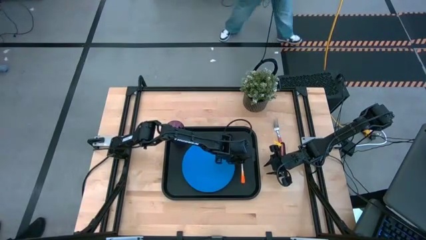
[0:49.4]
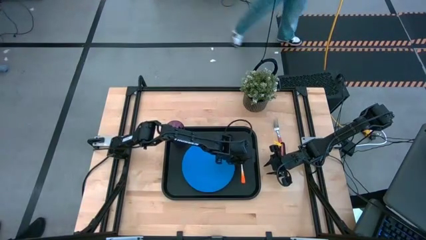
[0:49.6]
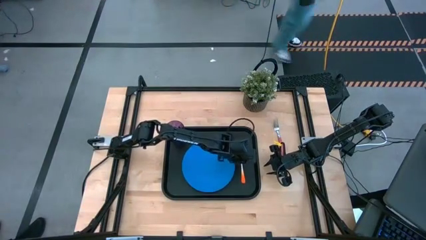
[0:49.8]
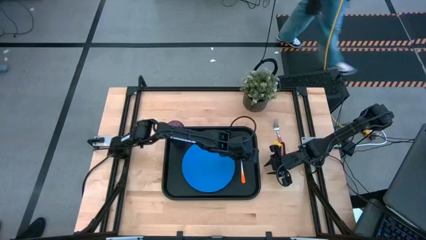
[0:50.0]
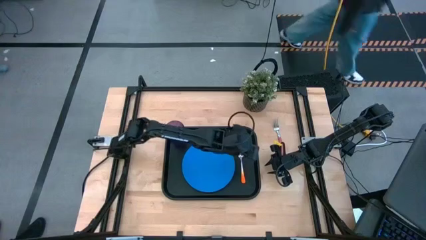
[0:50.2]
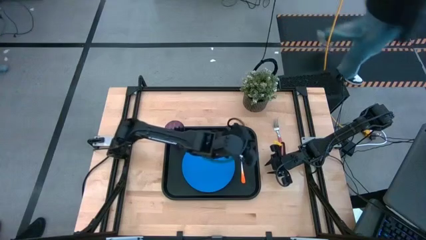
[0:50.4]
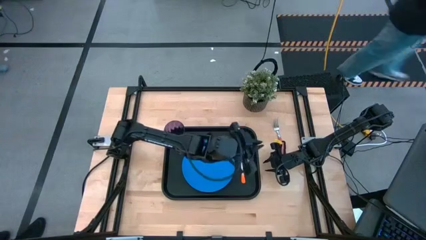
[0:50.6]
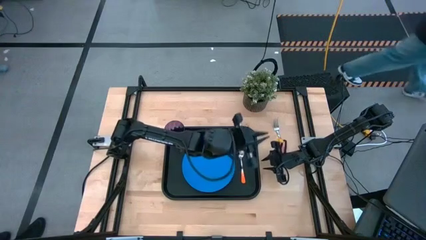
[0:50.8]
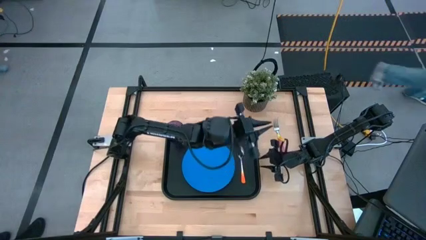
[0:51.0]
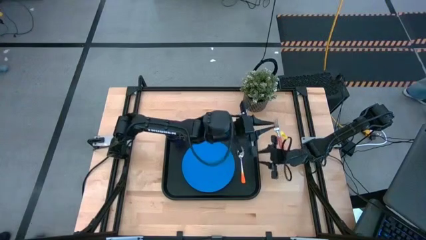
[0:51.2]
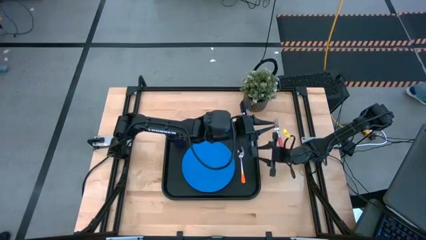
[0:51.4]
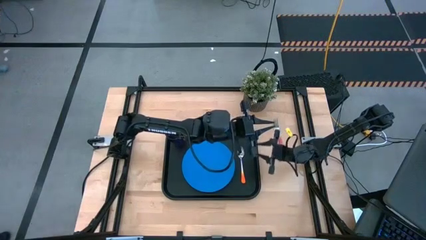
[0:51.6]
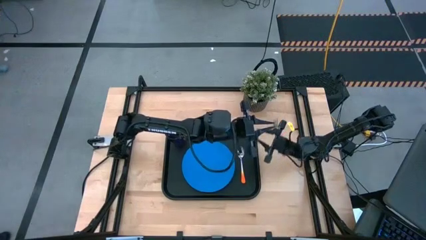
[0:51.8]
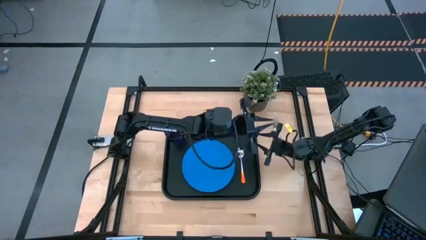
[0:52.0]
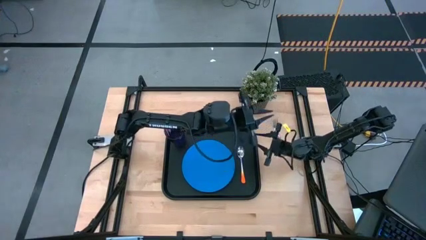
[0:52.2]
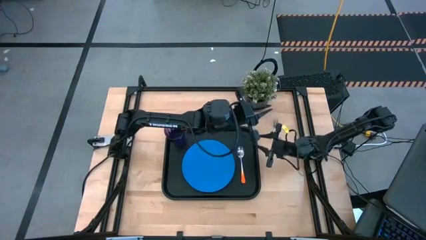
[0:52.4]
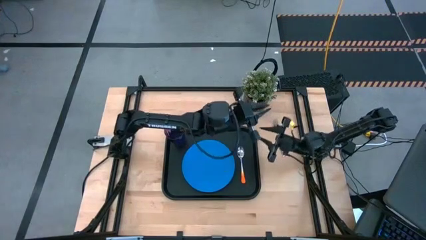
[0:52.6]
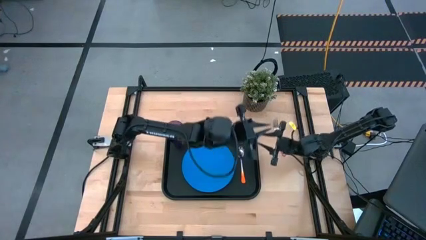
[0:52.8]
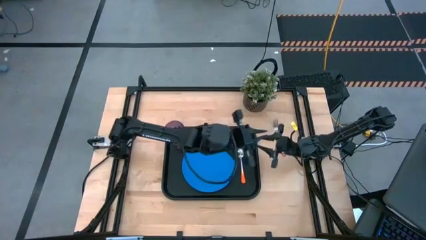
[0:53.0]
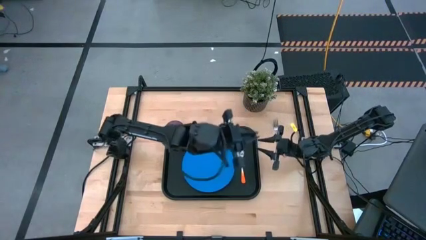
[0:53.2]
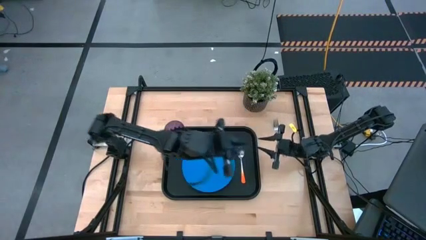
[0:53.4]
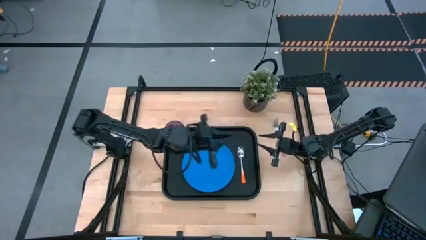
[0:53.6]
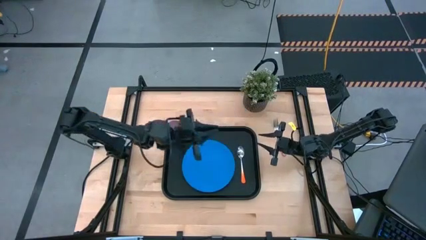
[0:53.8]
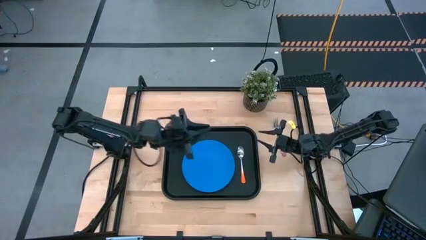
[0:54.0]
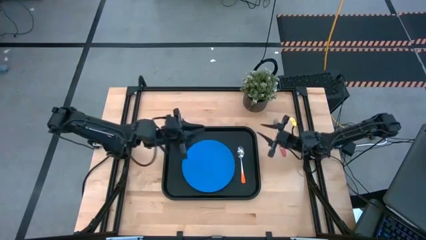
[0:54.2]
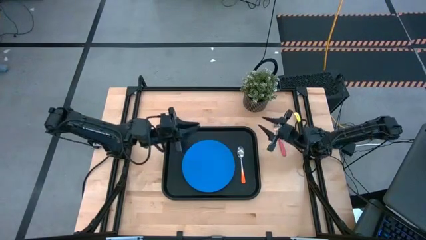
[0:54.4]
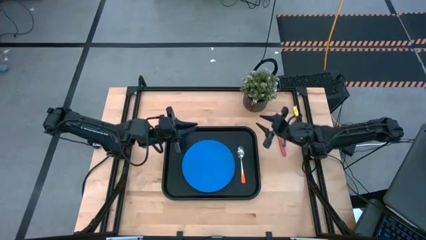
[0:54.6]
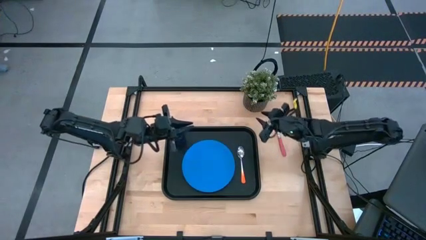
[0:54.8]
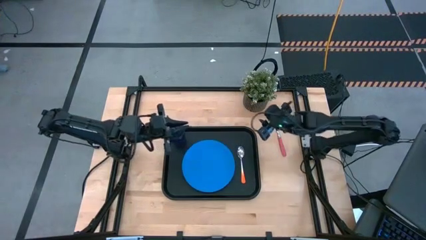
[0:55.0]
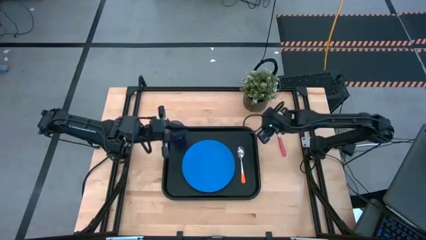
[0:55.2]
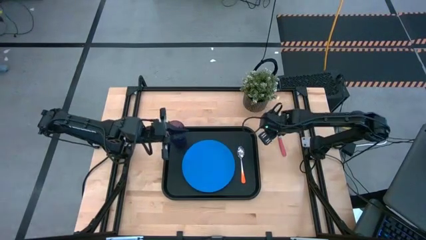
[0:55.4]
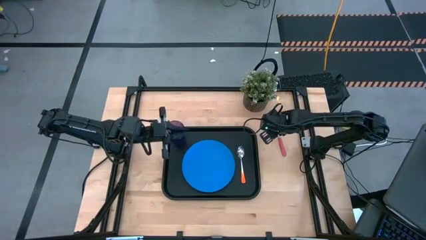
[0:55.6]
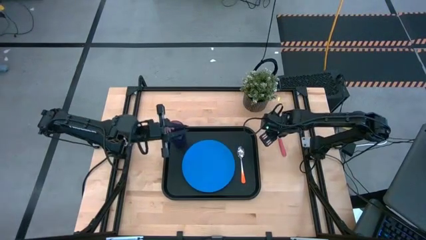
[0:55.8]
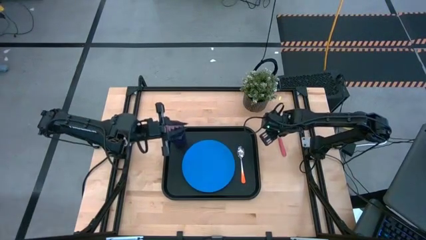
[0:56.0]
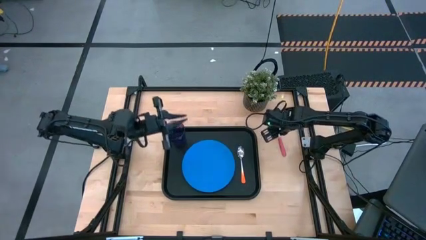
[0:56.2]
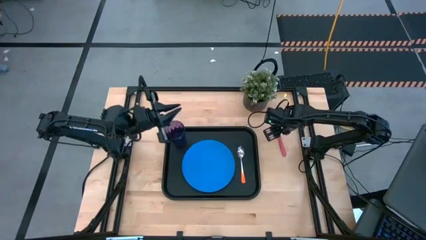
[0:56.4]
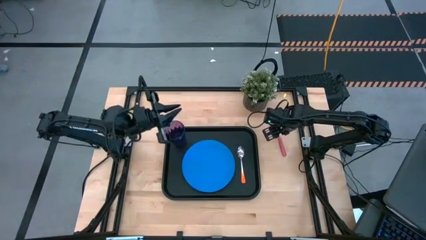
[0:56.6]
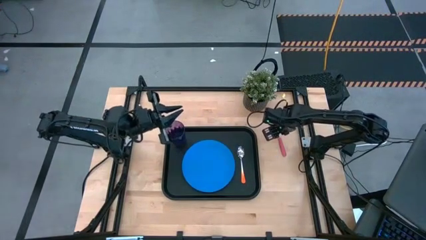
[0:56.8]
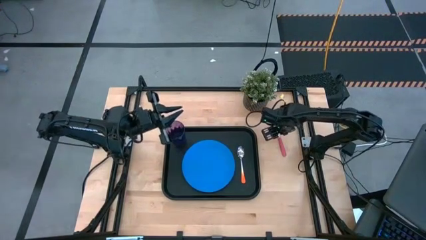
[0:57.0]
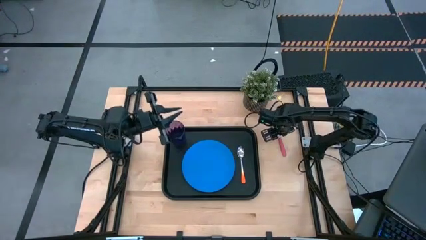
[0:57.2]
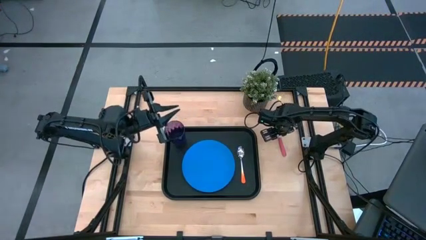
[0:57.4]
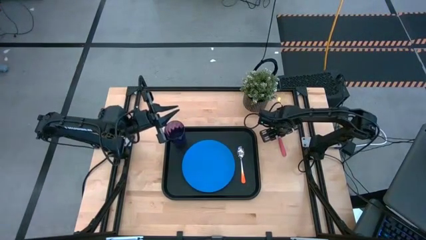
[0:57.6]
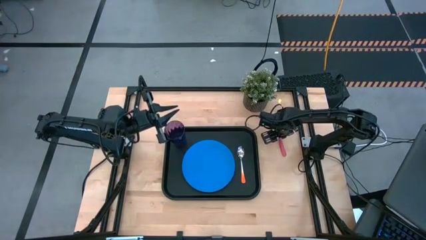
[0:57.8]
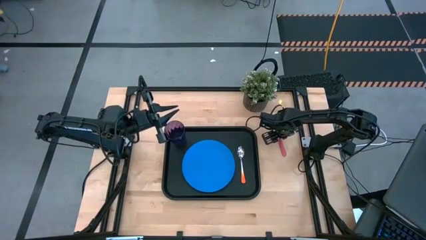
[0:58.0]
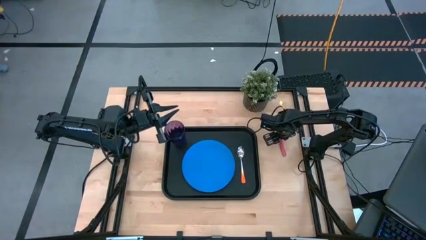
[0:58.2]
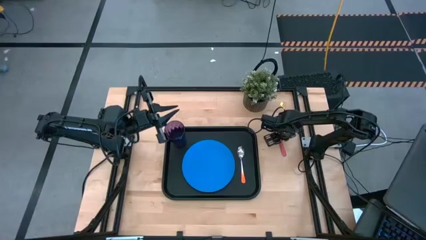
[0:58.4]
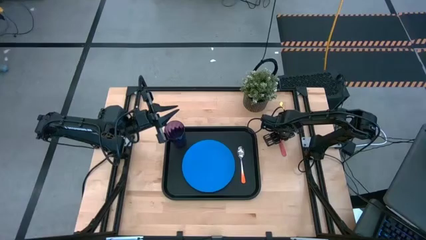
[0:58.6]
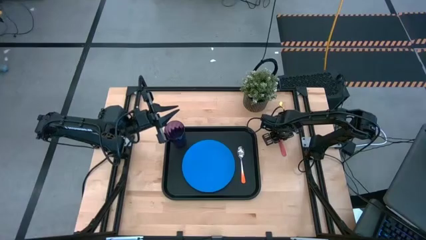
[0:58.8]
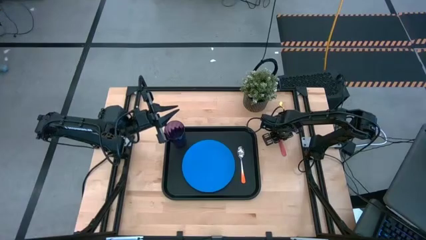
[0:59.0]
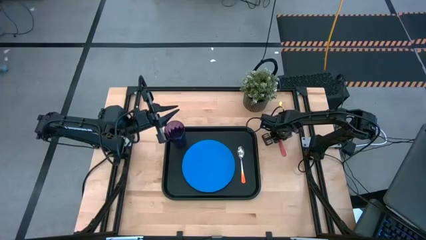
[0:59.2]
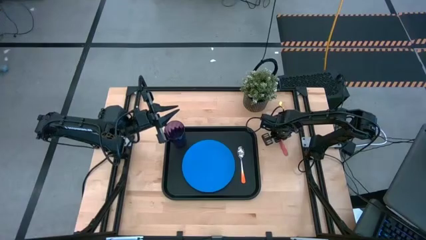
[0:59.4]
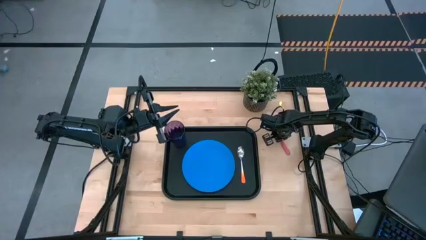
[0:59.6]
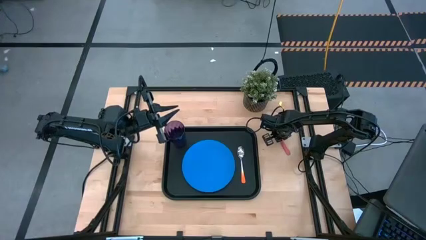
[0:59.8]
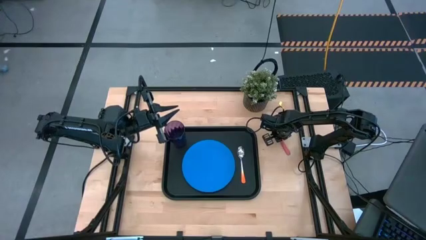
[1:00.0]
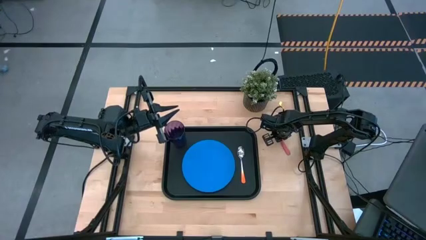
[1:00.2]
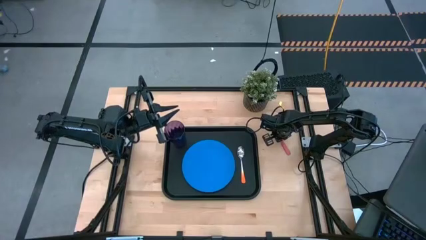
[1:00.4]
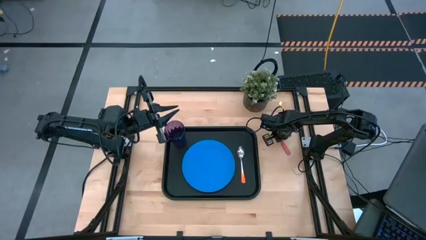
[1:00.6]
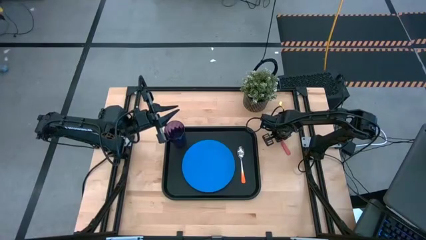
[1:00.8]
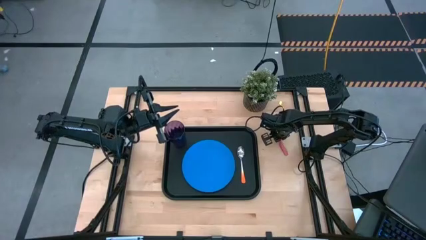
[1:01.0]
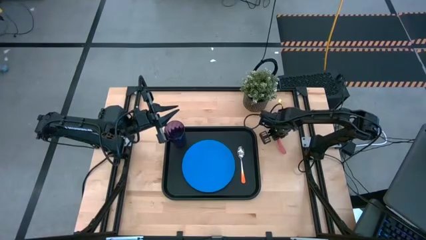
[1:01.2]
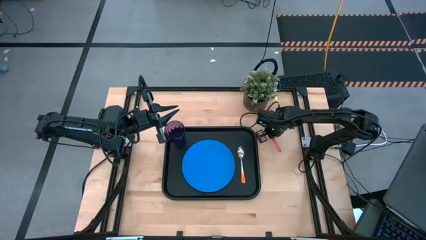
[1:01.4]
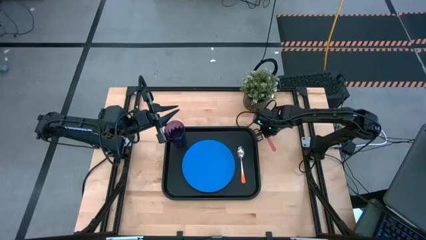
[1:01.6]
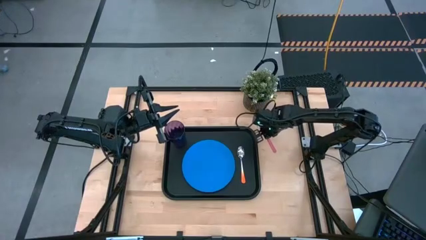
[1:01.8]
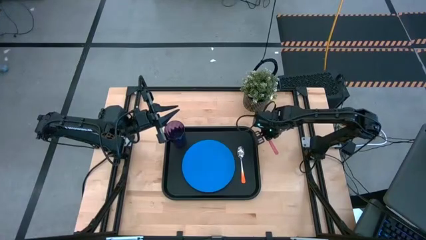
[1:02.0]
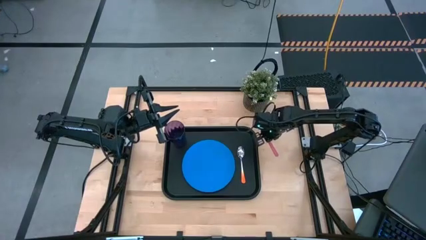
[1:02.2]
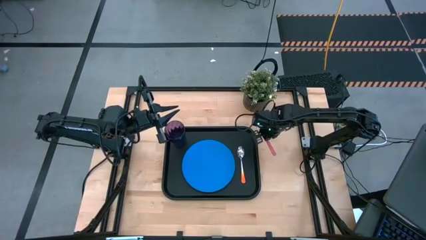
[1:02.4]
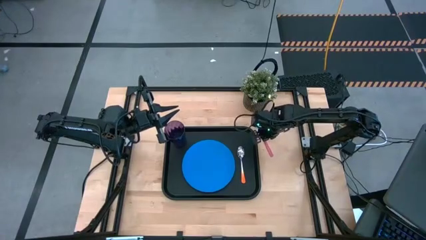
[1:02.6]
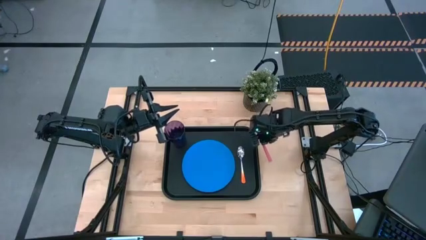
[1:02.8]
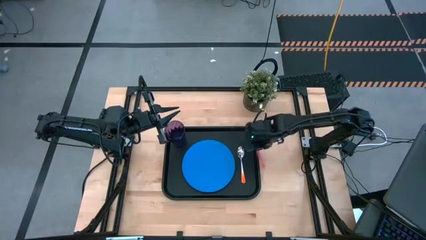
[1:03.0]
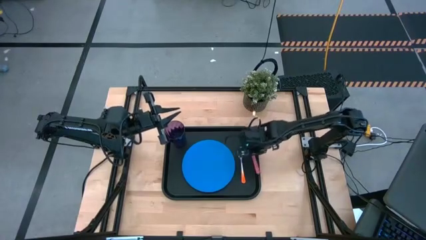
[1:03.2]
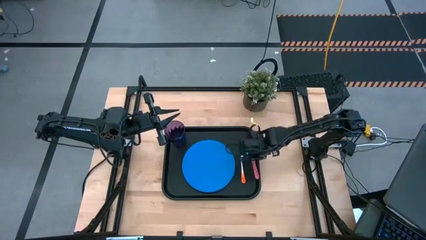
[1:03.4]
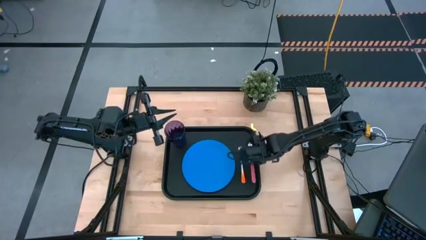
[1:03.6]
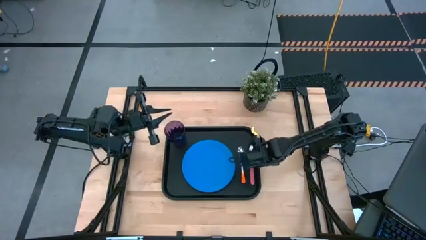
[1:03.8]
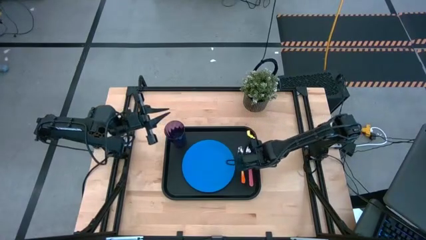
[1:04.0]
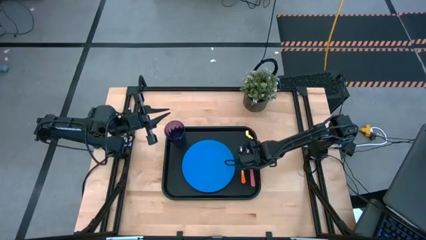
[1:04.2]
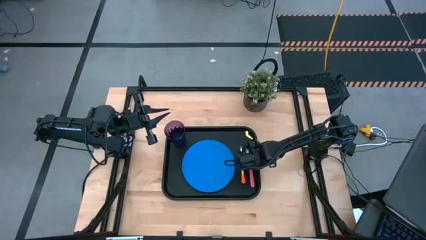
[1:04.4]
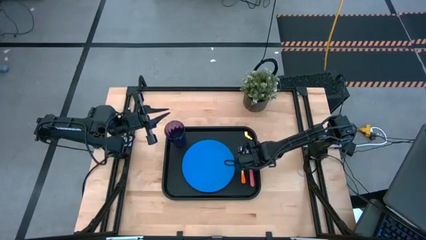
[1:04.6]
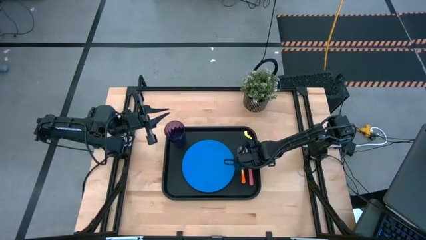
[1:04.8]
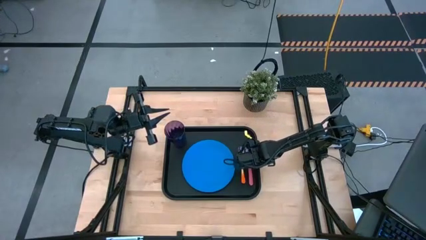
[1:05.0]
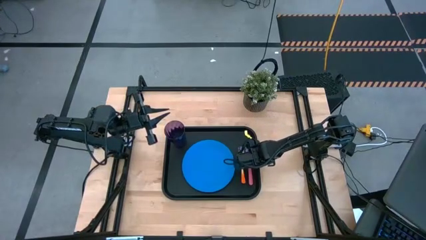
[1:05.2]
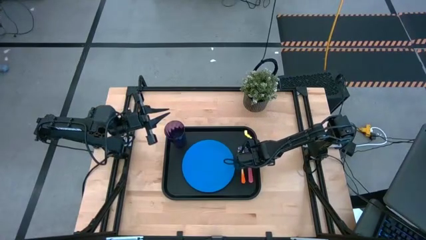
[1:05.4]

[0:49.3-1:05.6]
Task: Pick and place plate/cup/fork/spoon on tray
Put the pink fork on the black serving tray to the right of the orange spoon
